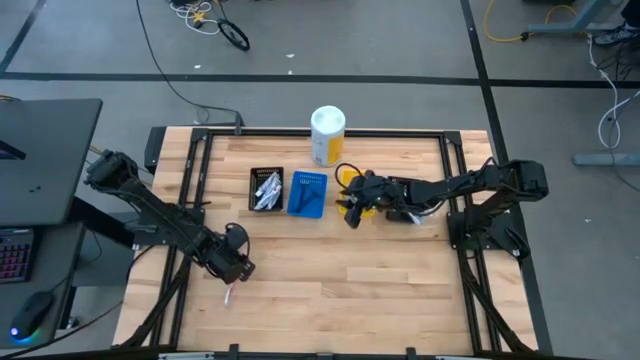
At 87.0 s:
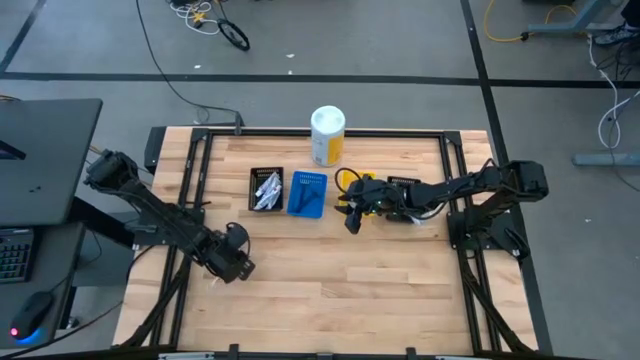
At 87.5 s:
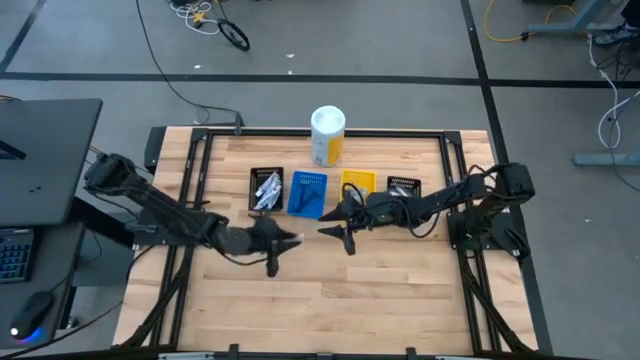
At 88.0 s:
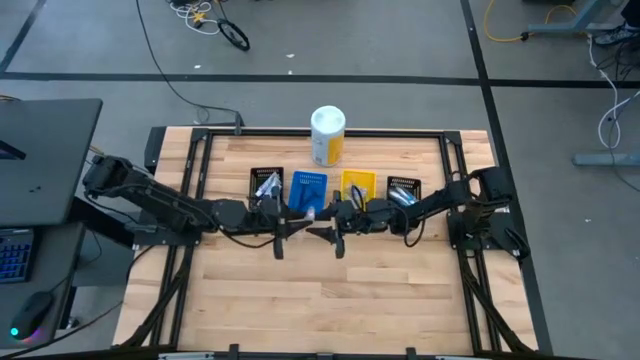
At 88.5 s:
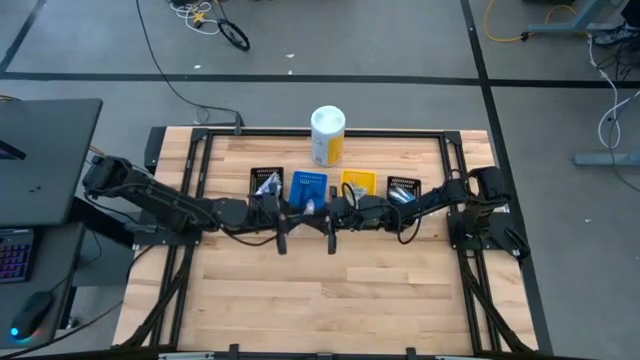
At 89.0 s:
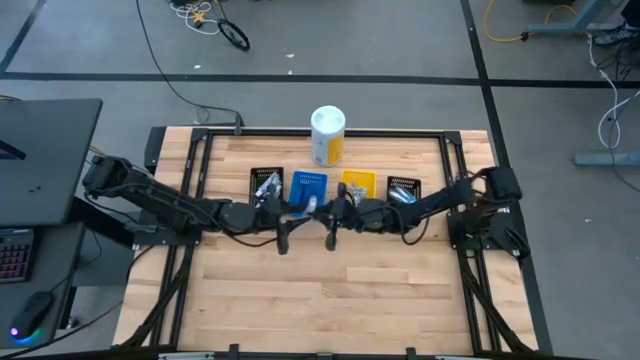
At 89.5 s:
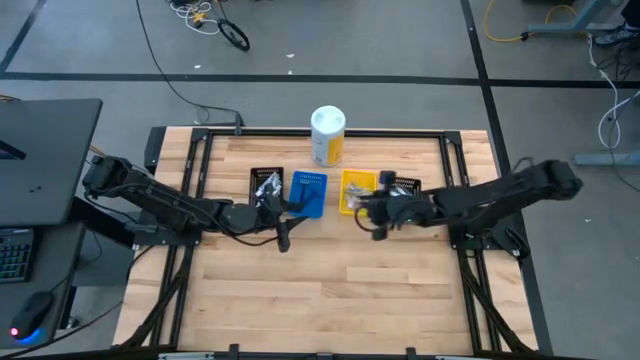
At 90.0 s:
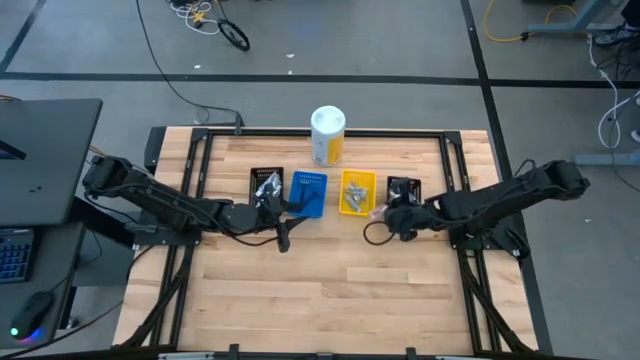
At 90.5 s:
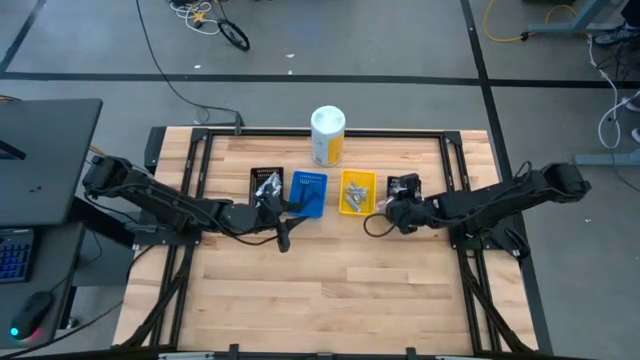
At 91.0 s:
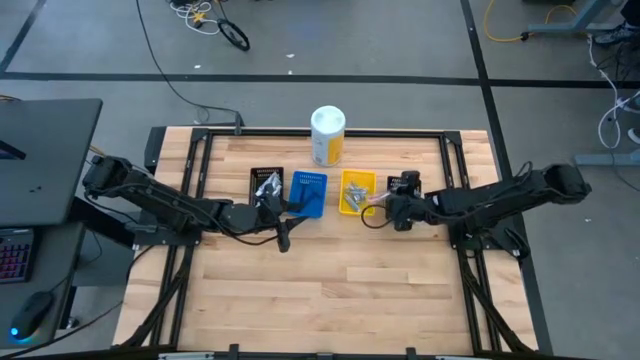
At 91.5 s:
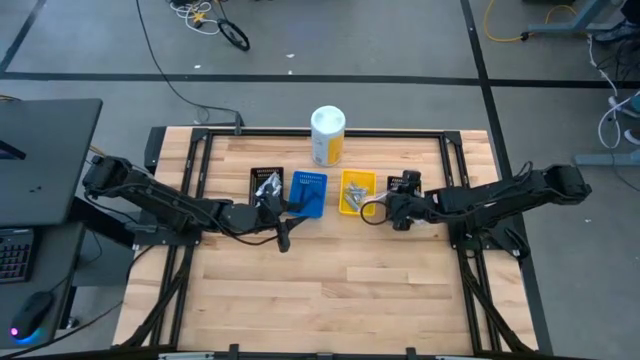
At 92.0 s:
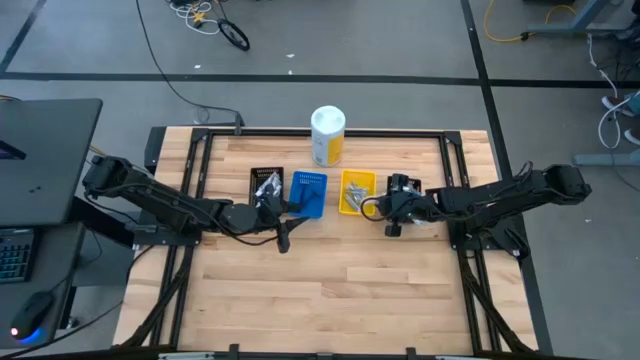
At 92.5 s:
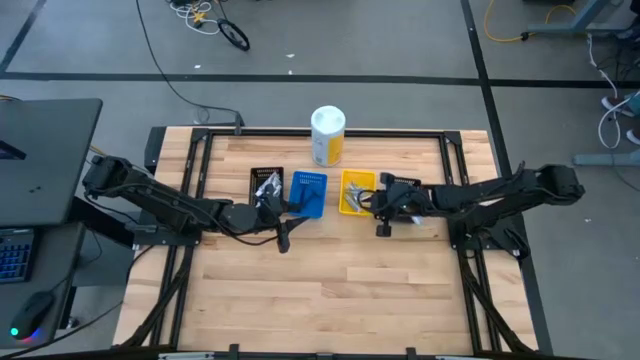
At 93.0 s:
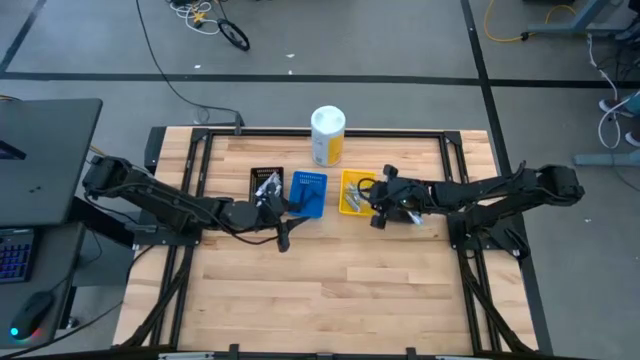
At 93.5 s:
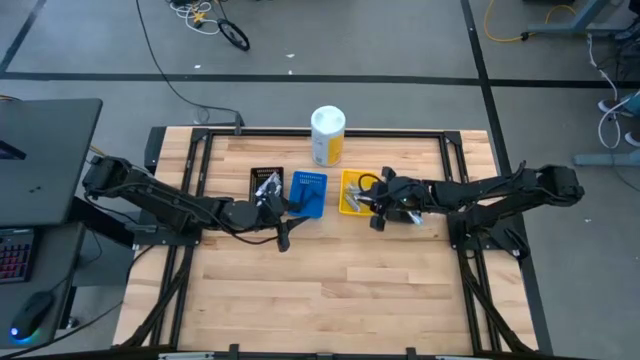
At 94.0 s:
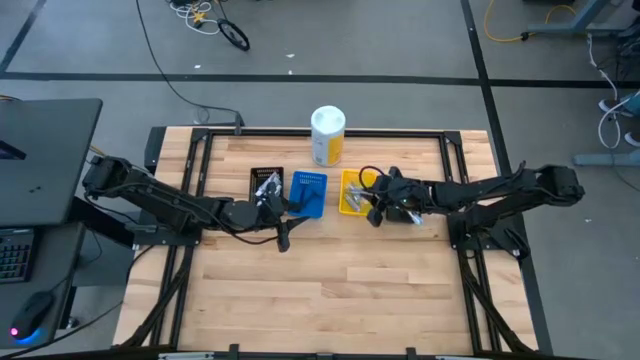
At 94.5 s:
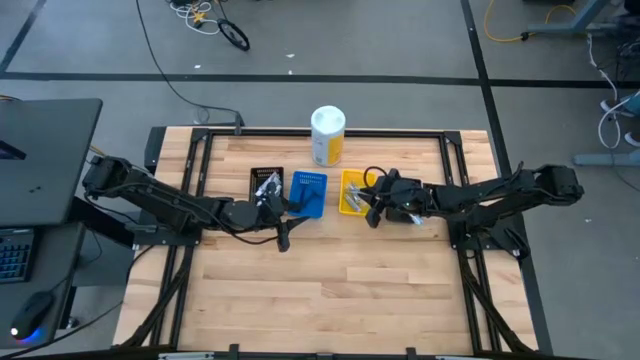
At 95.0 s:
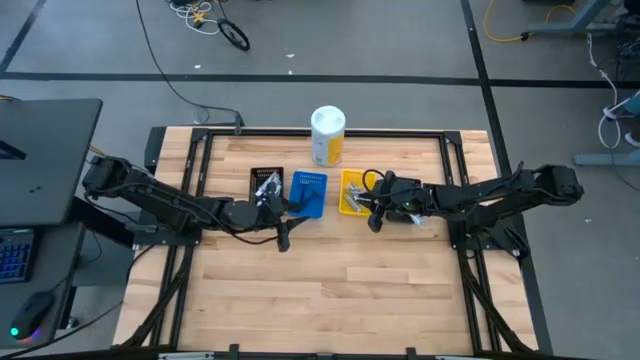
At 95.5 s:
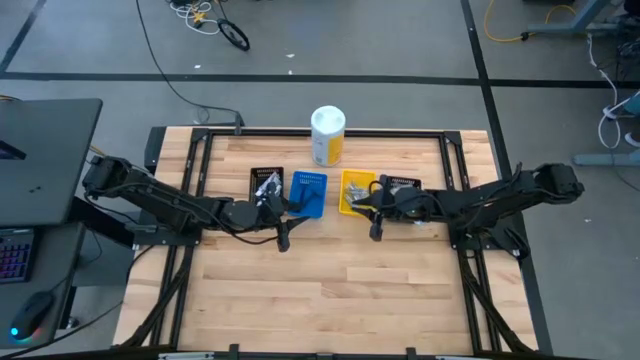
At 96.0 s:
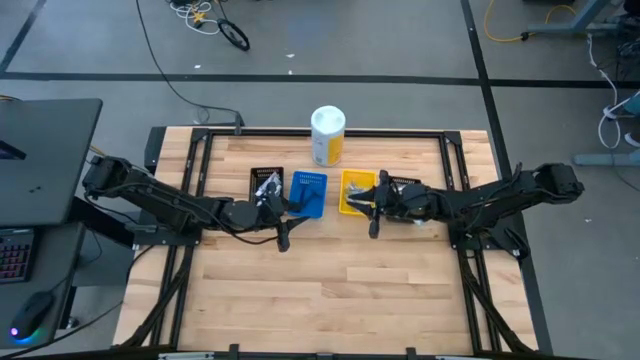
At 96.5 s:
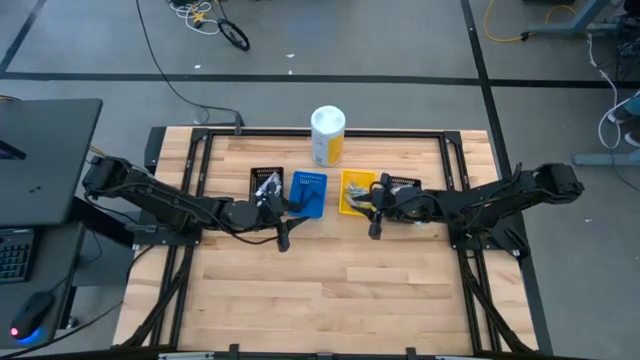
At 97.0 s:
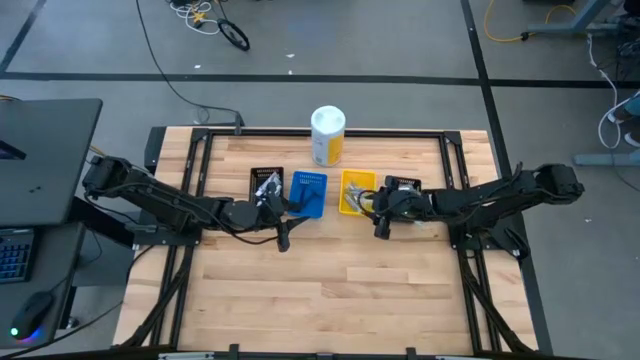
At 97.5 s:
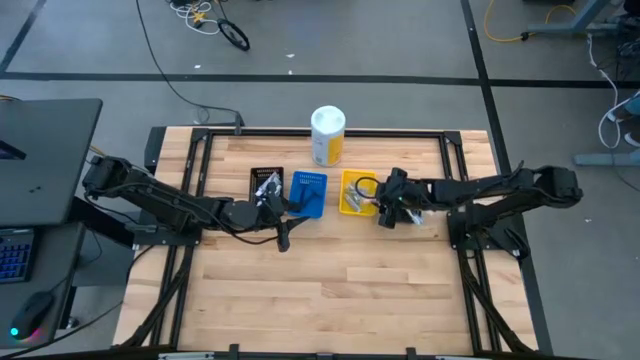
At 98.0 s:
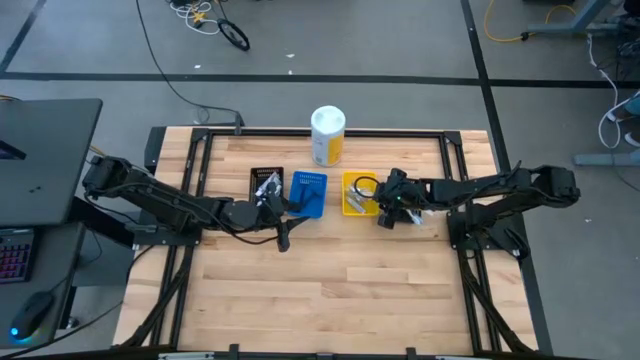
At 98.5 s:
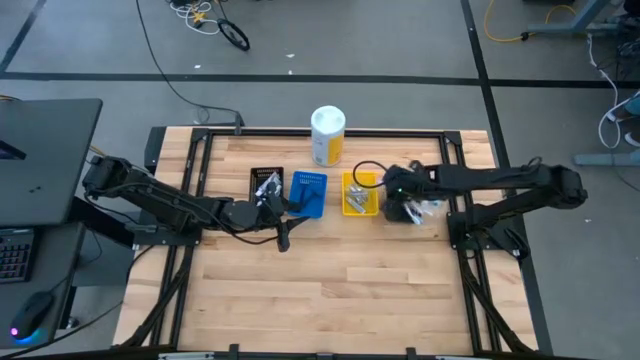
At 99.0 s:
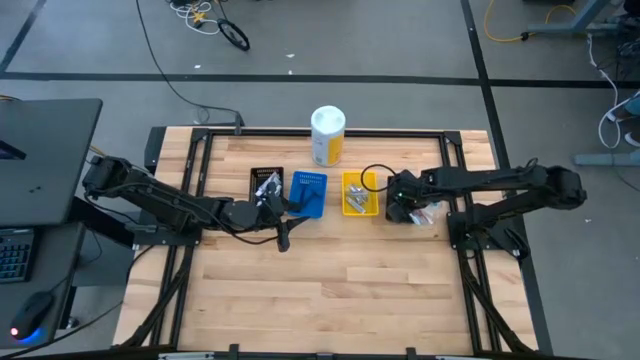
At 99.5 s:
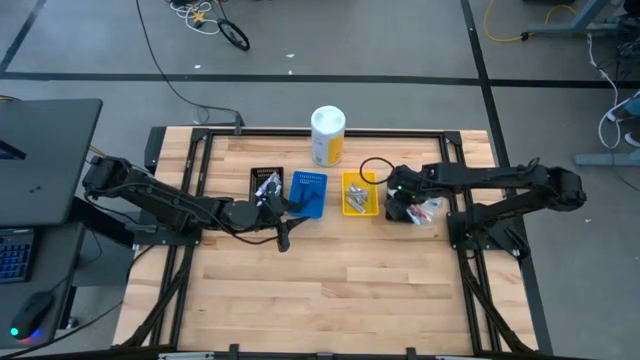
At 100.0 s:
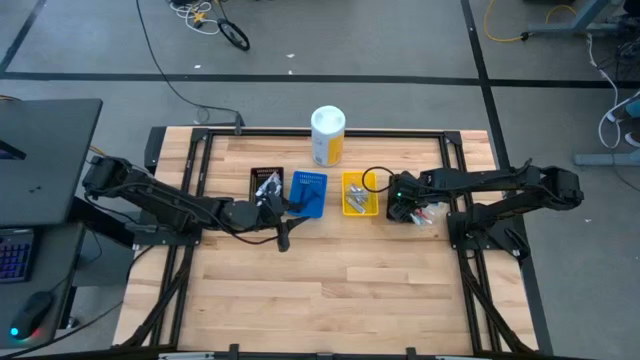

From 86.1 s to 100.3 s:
Task: Pick & Place Travel size toiletries
Put the orange toothbrush into the right black bin
